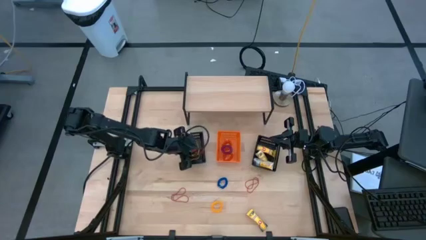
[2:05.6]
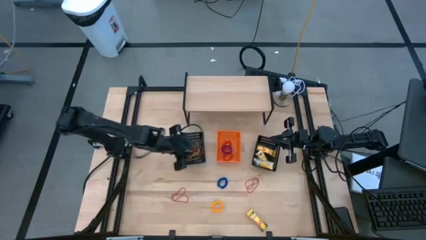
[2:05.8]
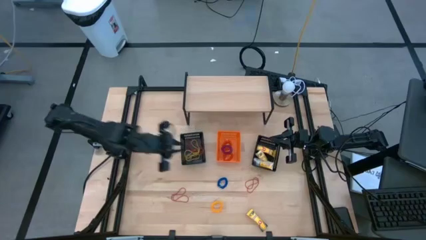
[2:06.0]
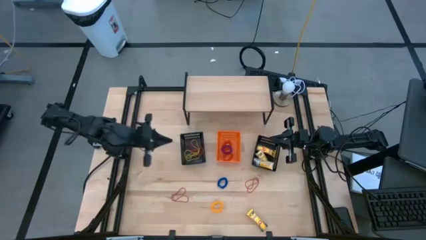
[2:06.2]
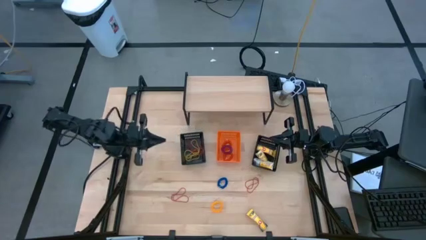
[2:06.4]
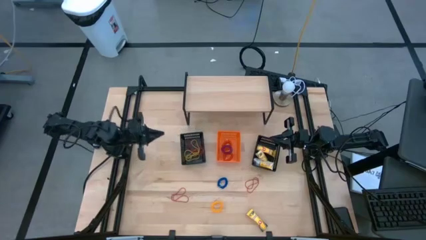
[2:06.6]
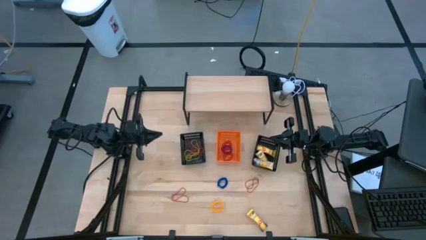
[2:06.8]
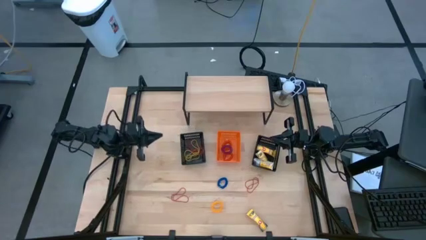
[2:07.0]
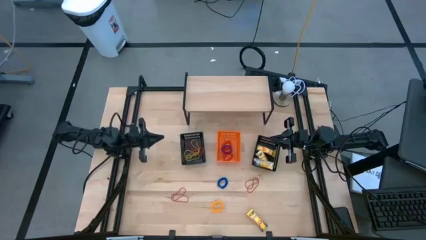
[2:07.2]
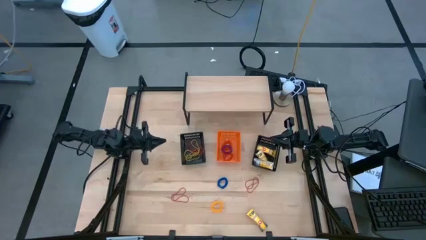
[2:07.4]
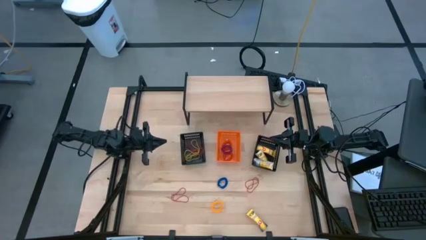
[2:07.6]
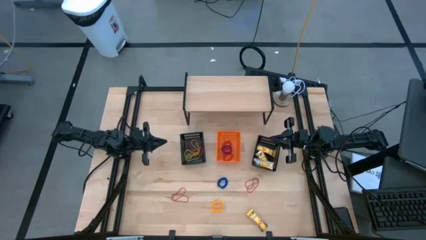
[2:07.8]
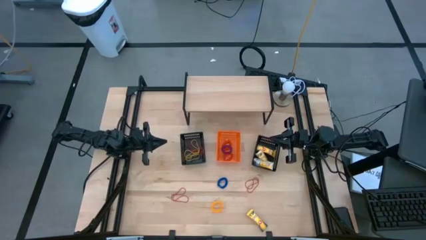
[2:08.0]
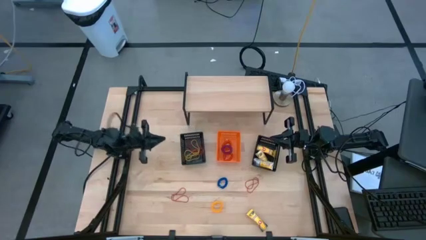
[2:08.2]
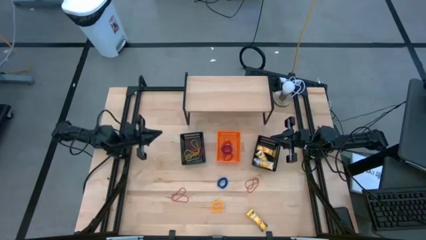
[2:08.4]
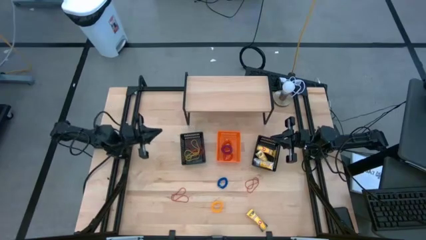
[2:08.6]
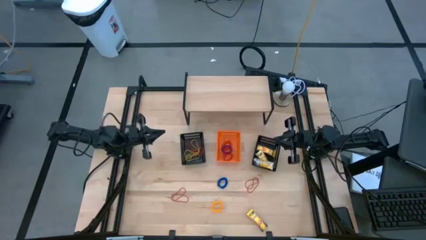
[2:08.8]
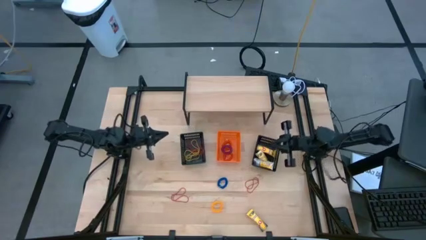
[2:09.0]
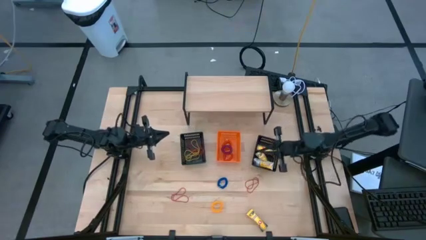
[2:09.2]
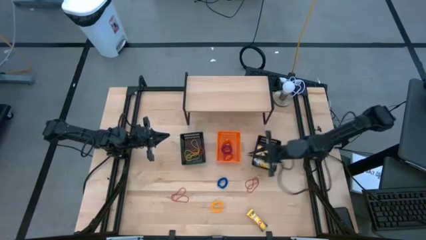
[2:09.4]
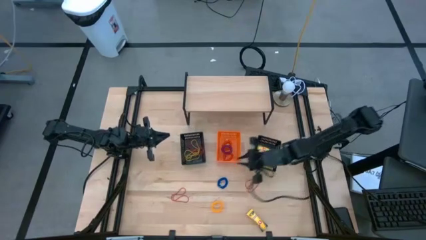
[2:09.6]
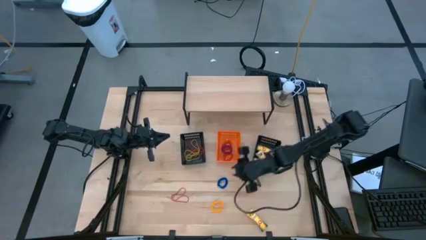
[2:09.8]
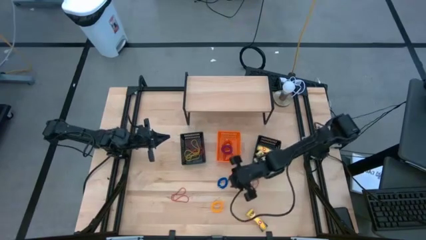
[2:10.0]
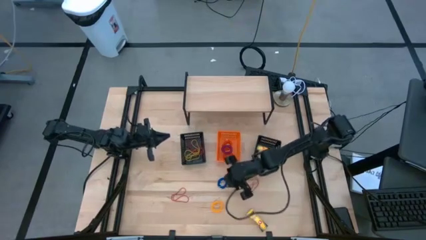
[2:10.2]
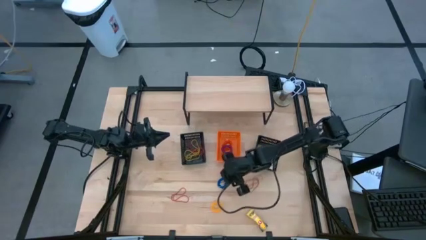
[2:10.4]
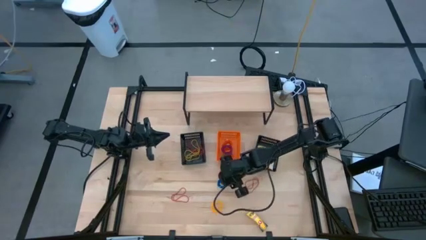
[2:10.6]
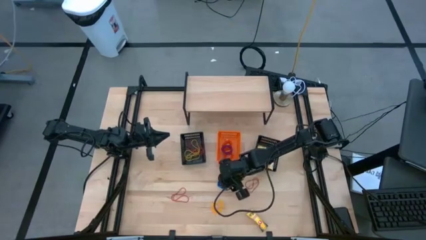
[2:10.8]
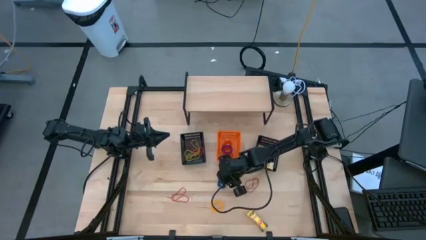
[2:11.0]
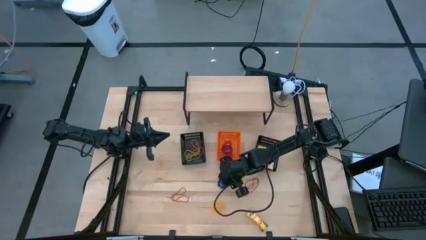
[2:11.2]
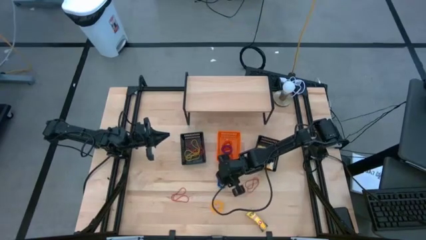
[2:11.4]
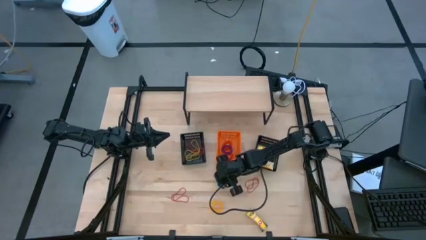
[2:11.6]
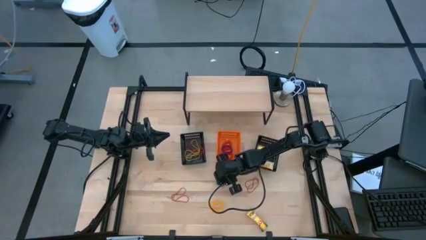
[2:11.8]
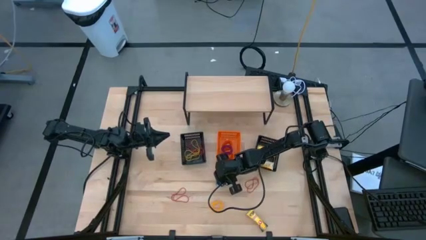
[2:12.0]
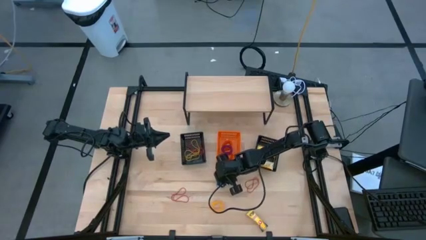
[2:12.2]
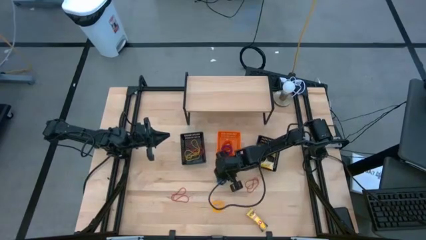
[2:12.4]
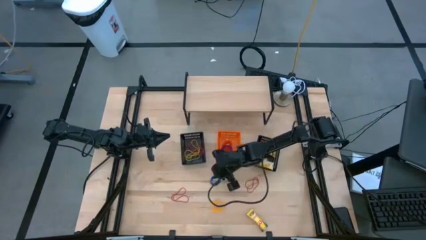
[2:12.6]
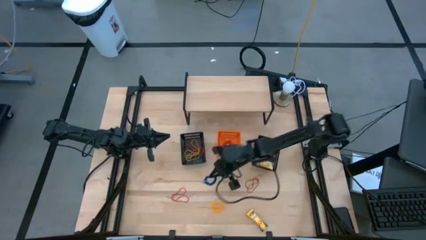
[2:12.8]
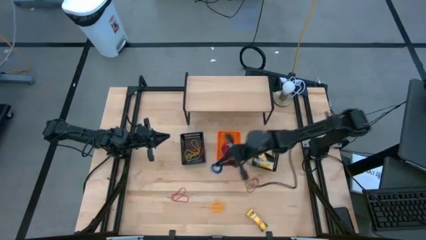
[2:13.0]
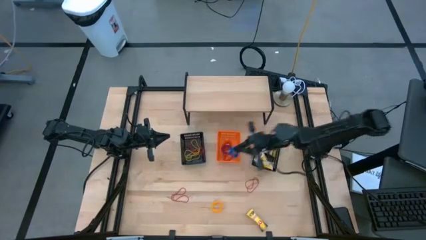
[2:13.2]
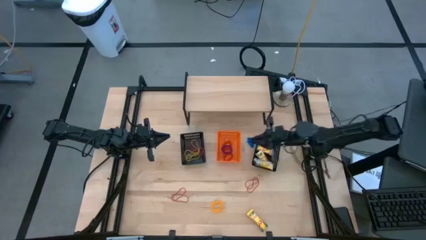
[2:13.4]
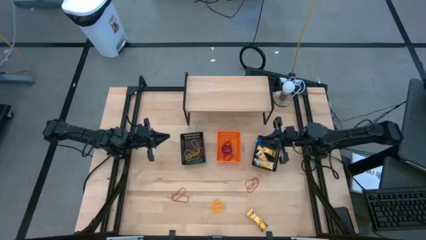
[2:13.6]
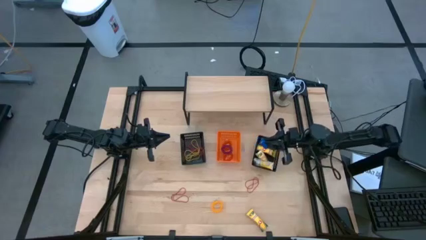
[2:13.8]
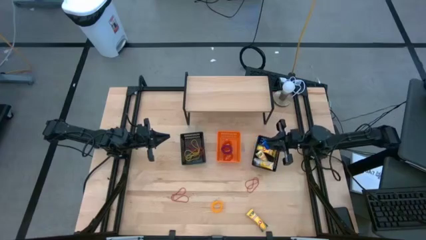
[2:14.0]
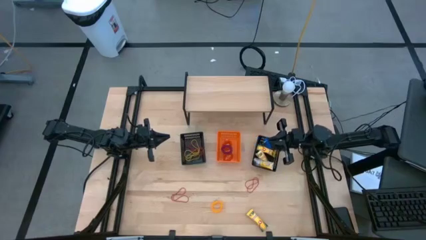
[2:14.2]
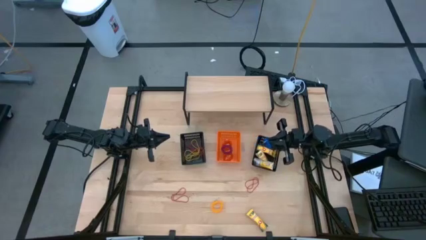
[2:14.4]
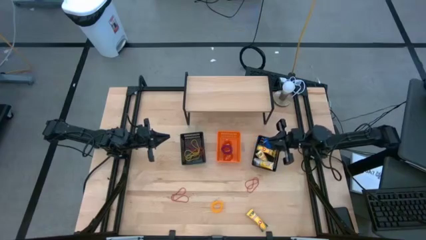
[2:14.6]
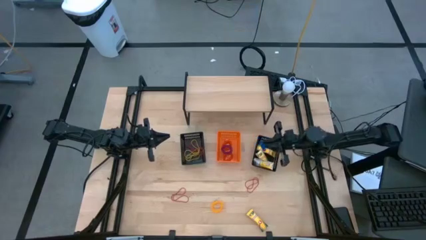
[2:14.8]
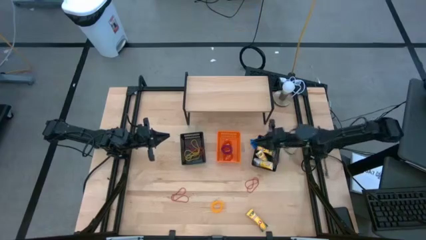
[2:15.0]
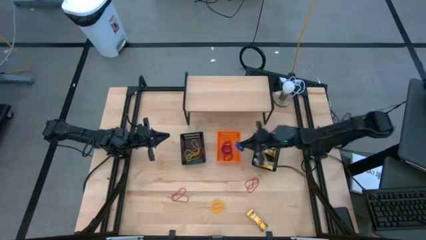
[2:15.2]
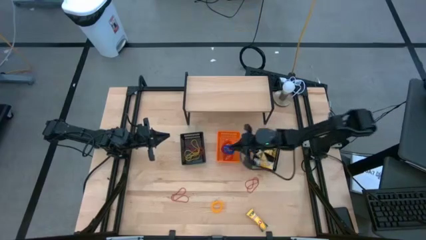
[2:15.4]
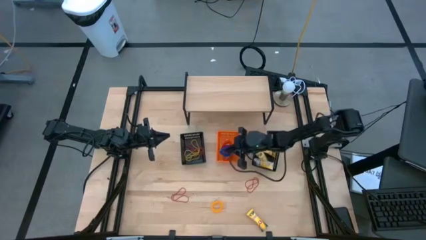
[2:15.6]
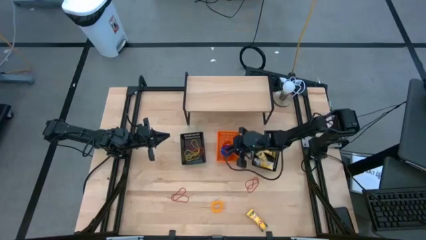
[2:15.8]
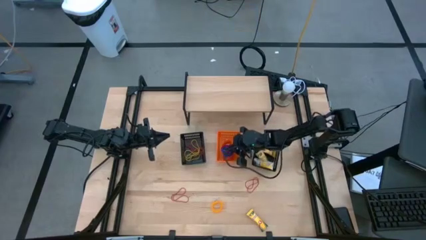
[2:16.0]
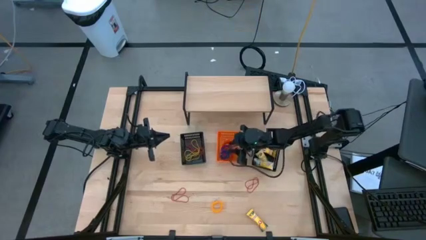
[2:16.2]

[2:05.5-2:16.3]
Task: Pick & Place Office Desk Supplies
Put the blue spring rubber band into the orange bin

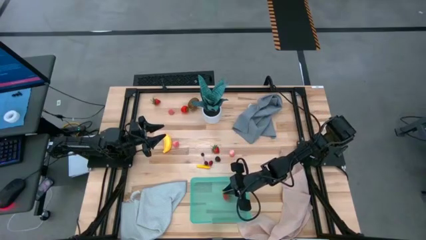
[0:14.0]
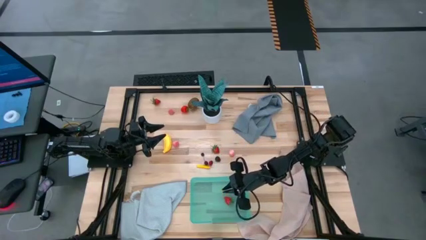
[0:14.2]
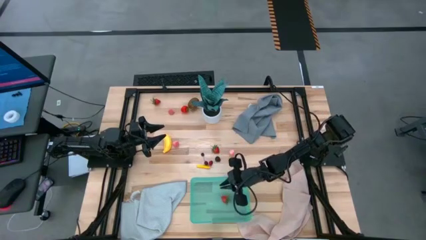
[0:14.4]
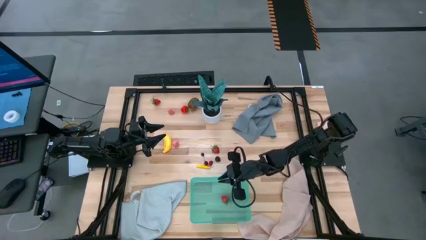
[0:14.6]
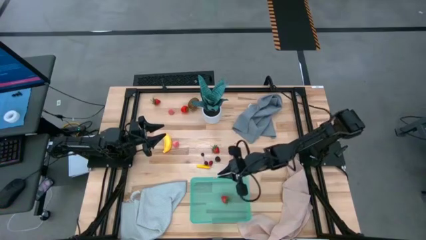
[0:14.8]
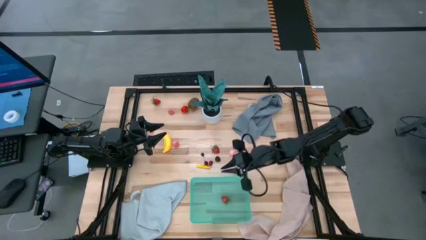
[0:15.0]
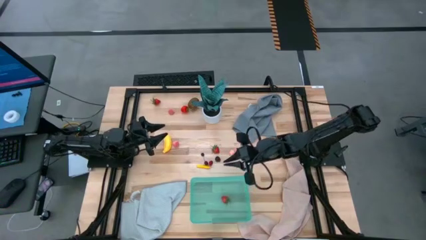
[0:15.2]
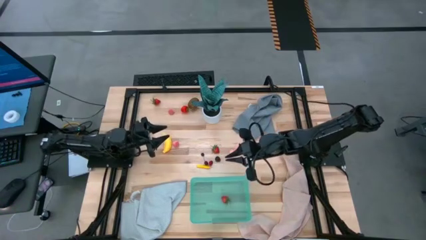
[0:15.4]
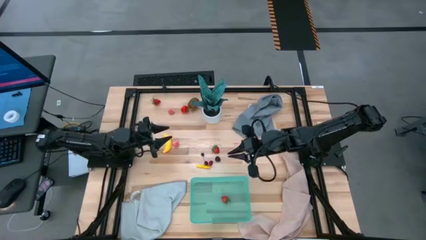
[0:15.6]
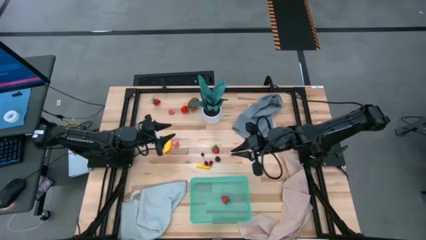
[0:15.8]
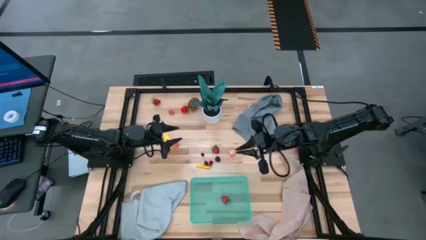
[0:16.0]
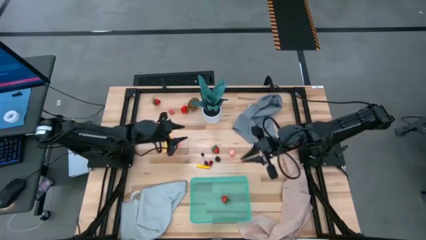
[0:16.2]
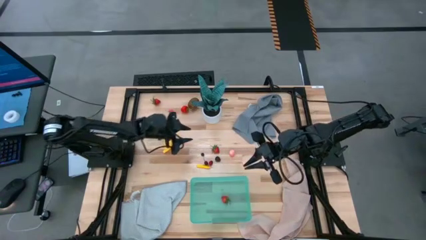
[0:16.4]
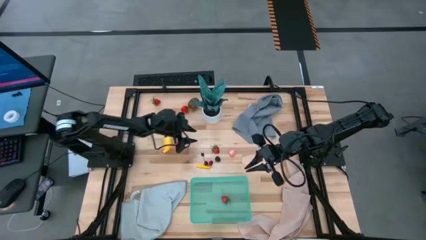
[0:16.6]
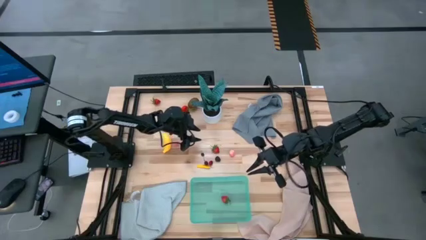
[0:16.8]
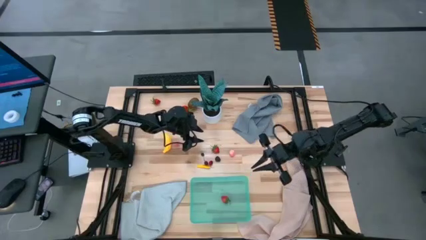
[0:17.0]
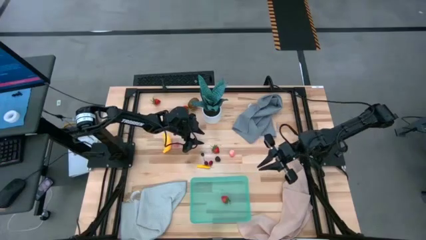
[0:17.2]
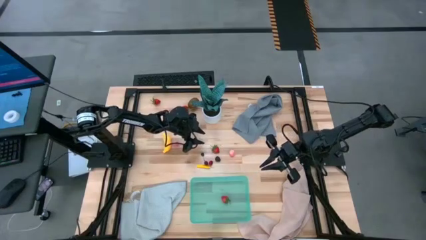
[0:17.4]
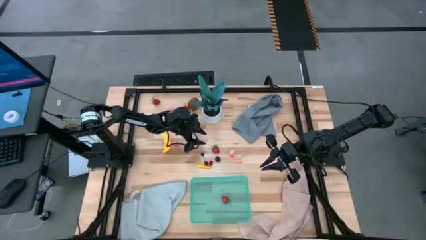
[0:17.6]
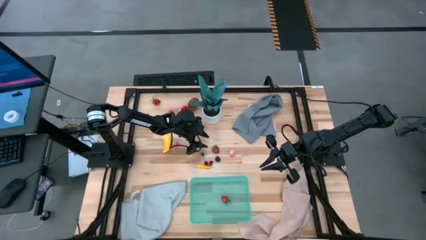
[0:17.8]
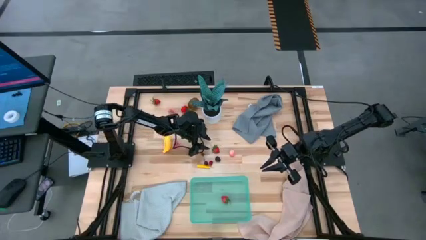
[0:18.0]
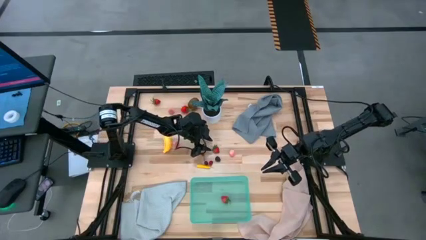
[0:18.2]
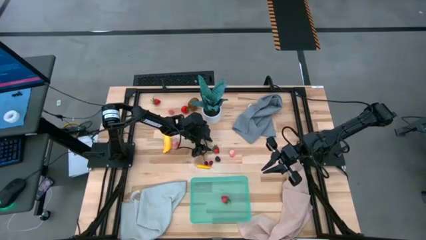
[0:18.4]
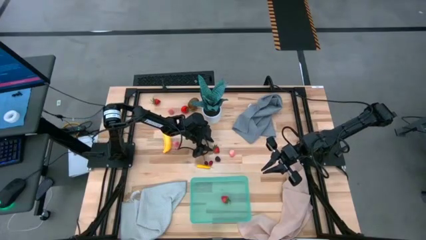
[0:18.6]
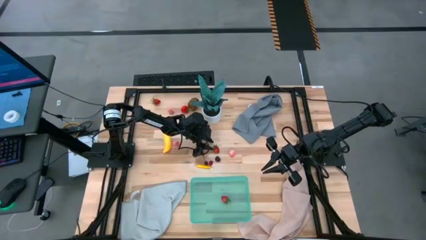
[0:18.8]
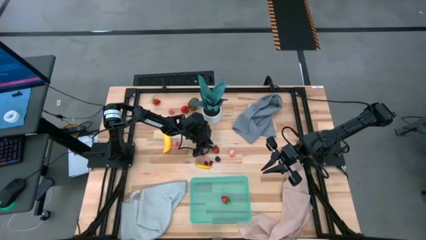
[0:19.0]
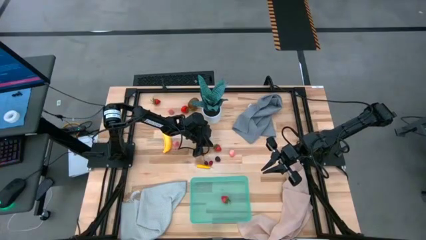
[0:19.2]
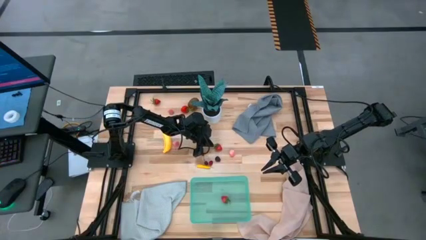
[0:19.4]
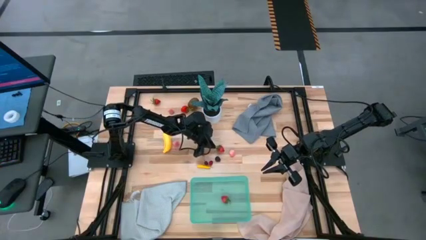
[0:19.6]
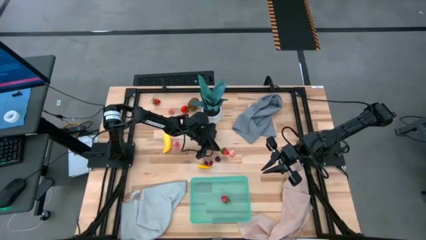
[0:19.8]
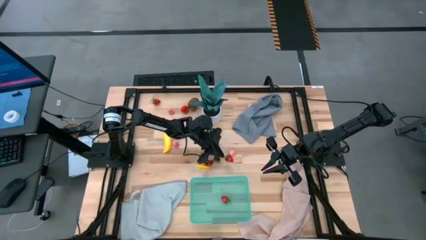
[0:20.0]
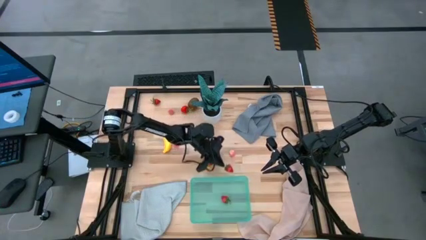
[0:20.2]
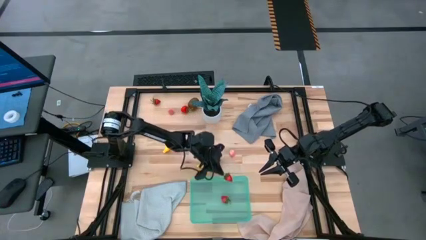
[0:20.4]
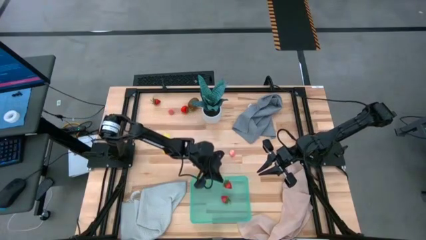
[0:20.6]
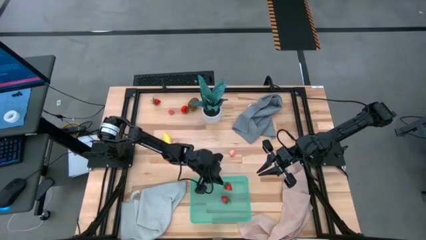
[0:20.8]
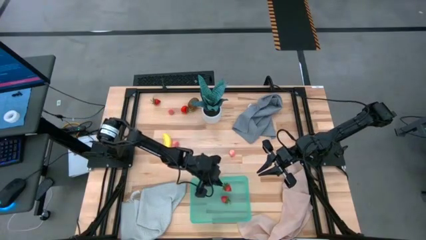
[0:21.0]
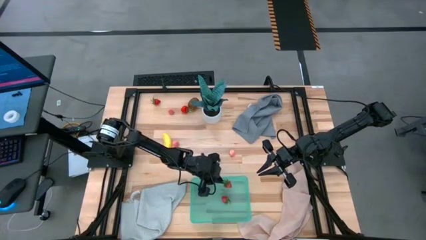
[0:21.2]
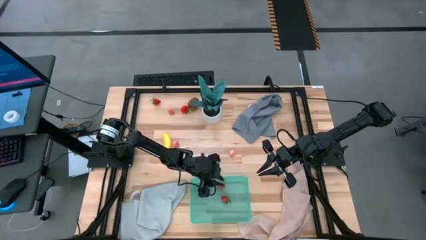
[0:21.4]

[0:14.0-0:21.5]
Task: Pick and placing Produce into tupperware
Put the red strawberry into the green bin
